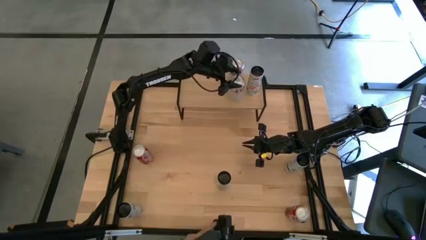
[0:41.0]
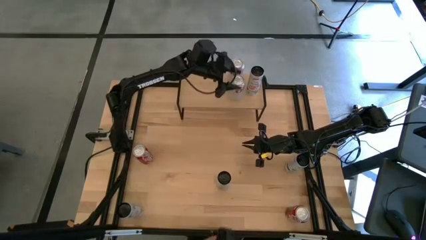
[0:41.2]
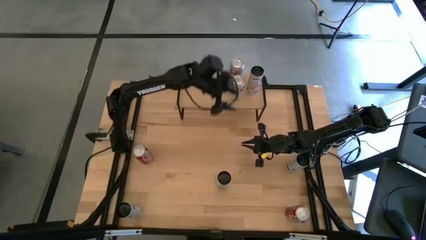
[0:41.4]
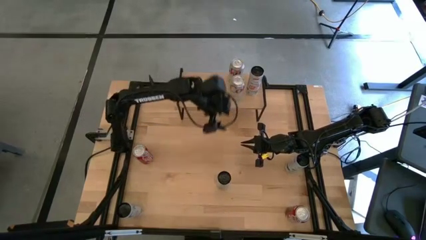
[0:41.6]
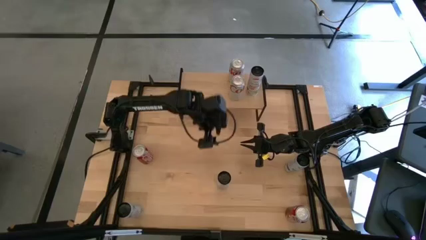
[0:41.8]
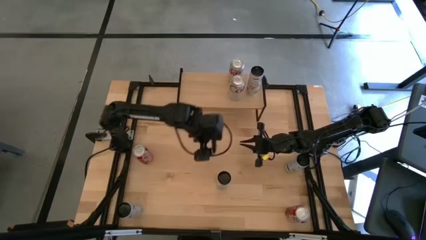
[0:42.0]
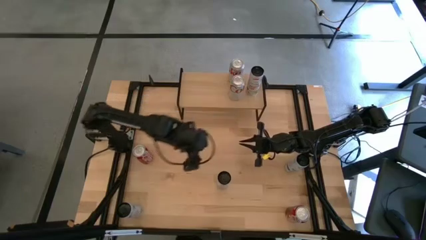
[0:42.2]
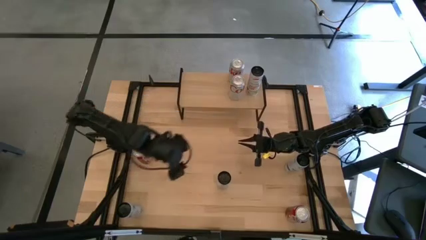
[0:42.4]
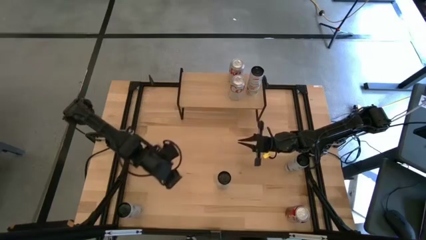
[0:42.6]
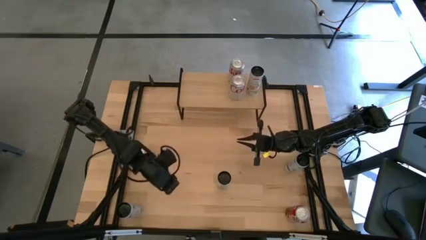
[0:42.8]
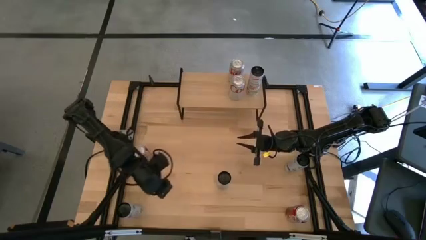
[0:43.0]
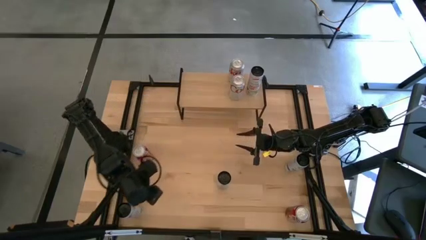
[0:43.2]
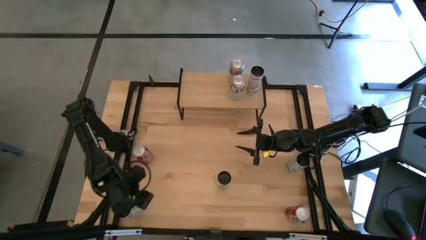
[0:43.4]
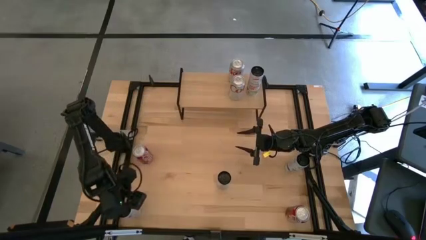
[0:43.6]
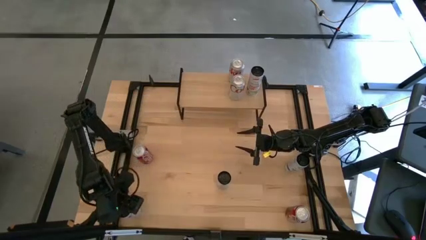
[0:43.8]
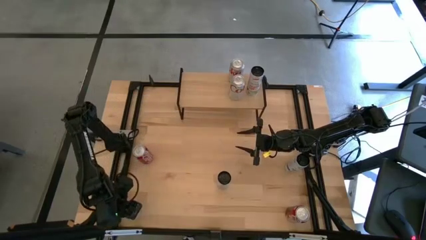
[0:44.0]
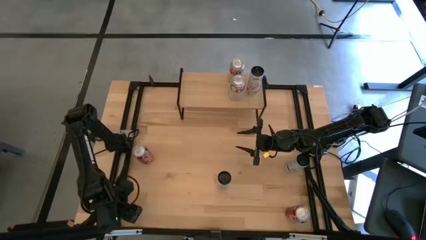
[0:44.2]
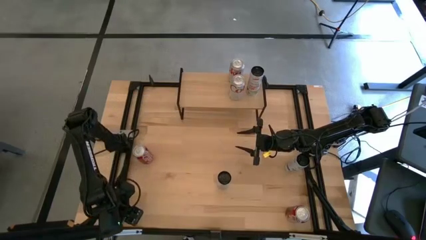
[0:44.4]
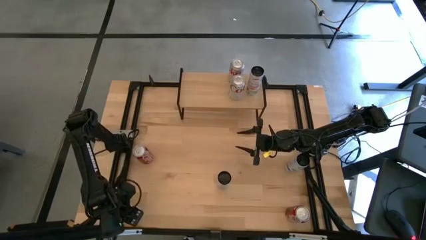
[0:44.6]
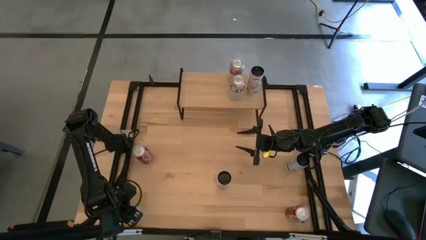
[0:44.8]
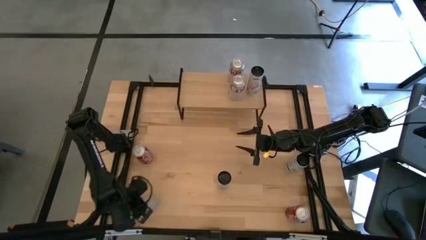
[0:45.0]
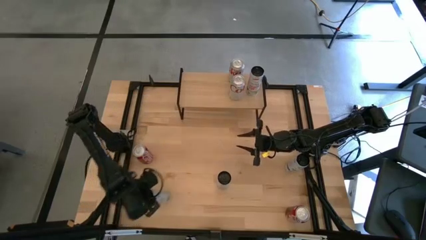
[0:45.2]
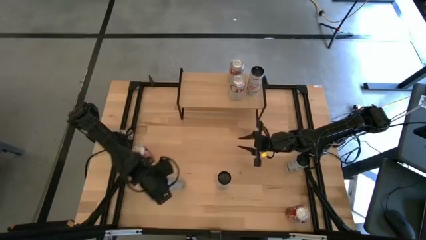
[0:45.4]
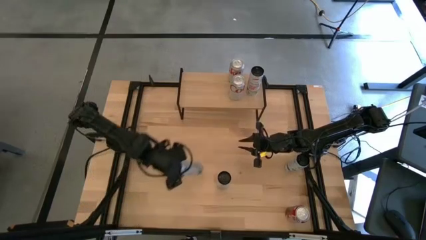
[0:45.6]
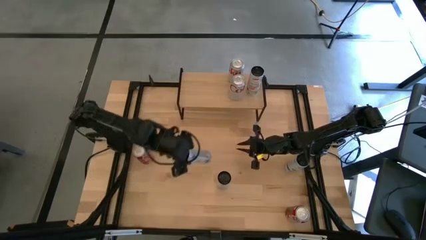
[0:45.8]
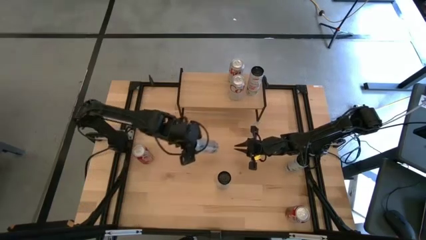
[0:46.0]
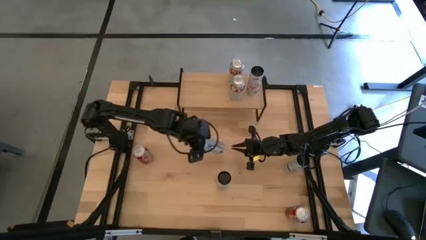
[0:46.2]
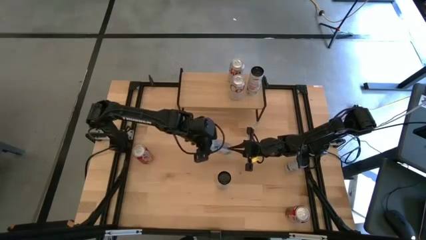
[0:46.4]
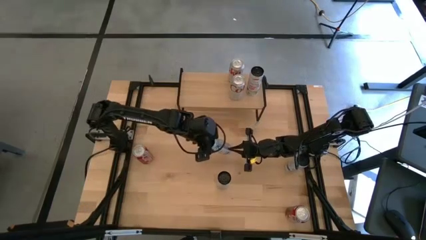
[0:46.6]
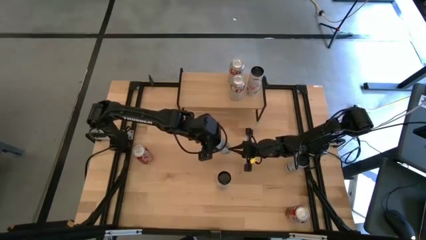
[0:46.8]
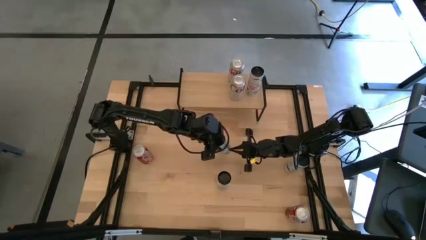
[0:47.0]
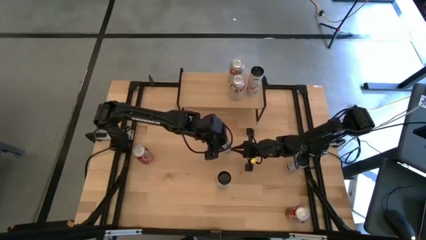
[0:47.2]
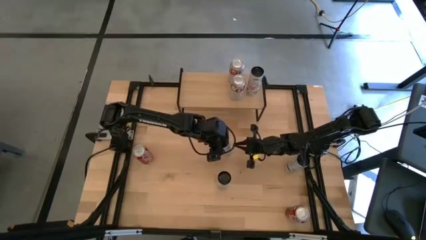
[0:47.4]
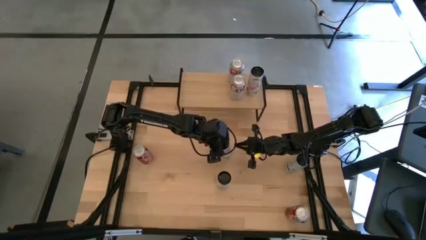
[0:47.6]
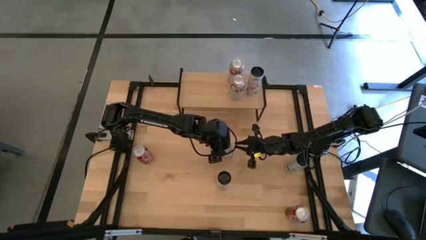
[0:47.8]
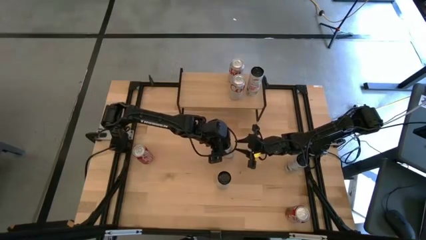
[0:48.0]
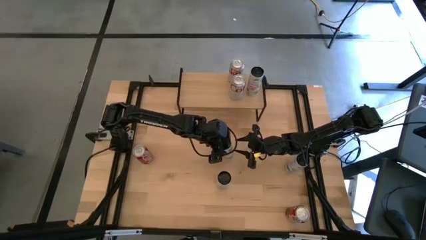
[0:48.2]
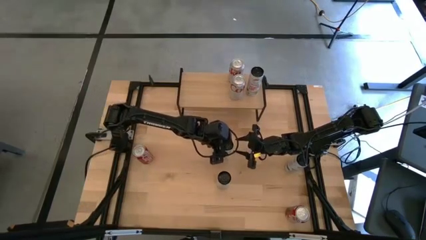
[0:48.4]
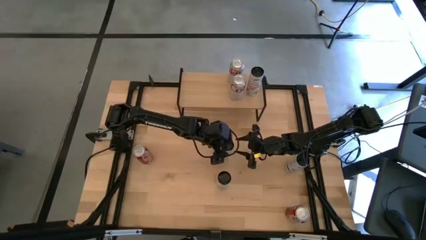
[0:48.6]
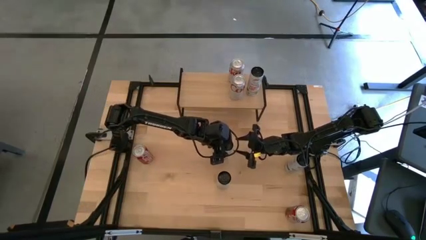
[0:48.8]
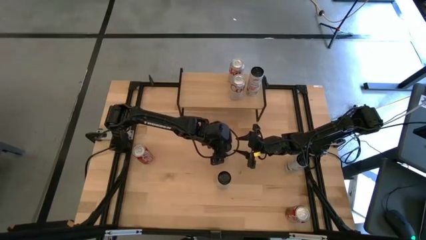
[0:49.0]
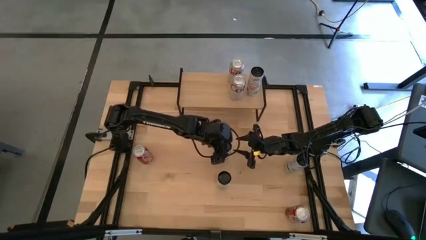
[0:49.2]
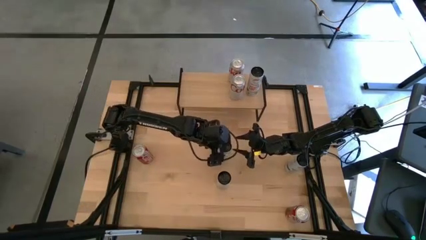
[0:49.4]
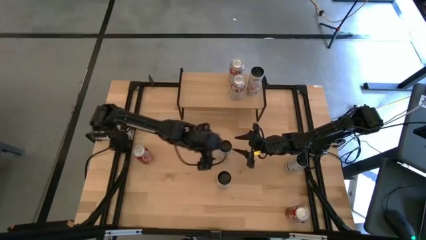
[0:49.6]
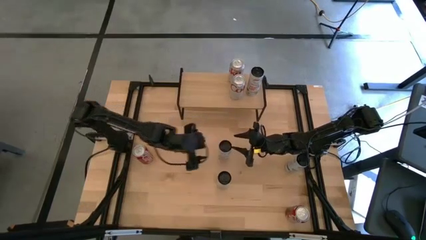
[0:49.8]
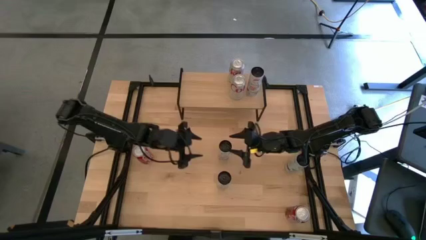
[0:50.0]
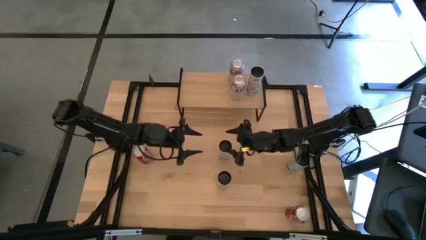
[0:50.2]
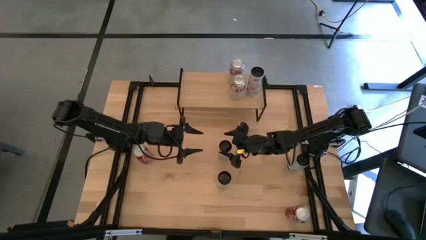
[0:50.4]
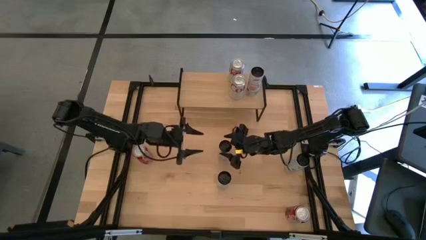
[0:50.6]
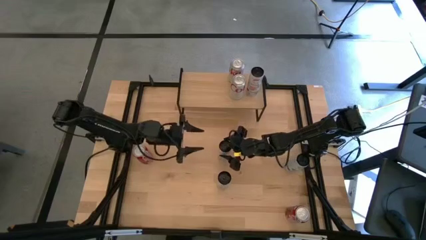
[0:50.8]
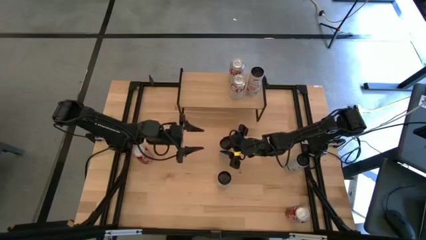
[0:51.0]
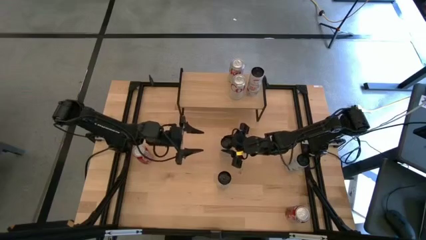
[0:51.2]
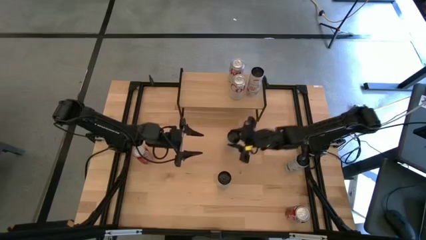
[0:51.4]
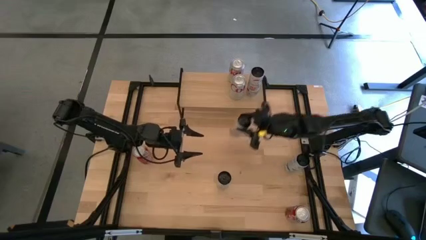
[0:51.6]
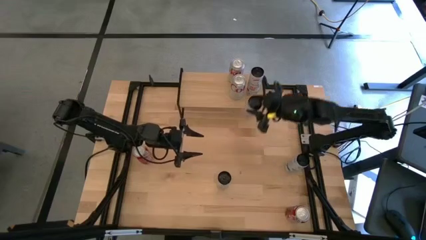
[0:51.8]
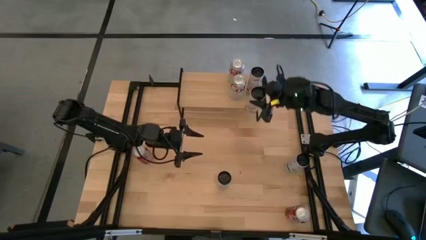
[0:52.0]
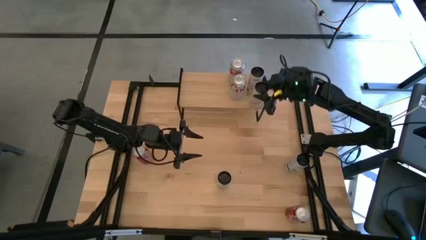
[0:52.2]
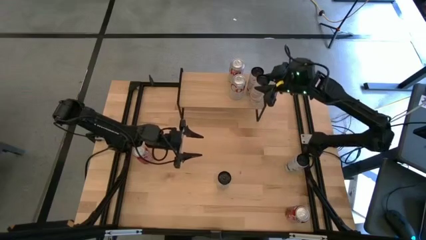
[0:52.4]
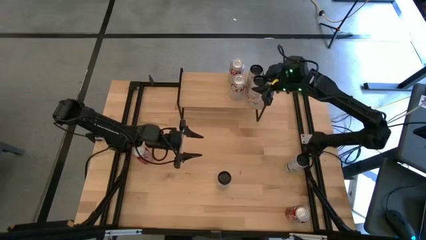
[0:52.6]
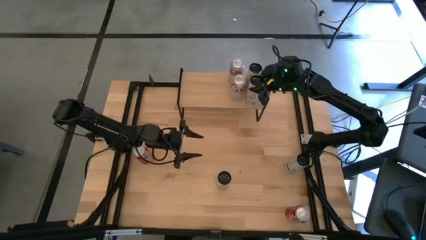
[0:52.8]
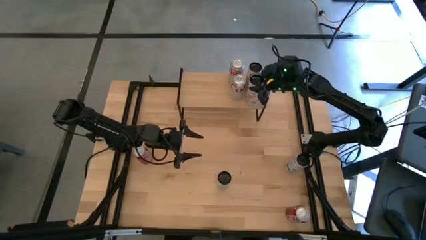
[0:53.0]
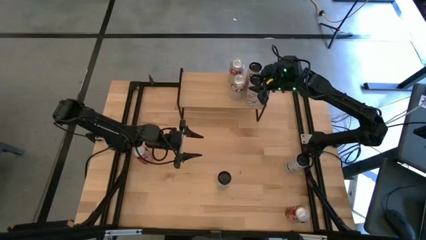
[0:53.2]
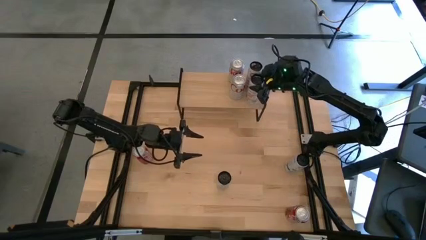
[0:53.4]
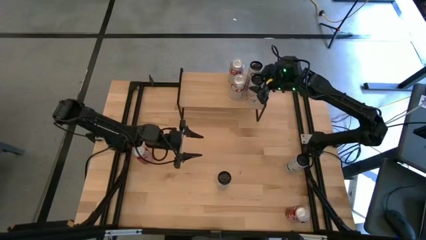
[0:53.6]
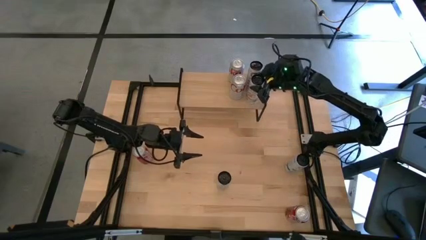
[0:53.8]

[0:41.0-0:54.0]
Task: Place canned beverage on shelf
Put the white-pink soda can on the shelf aligned with the other white-pink soda can

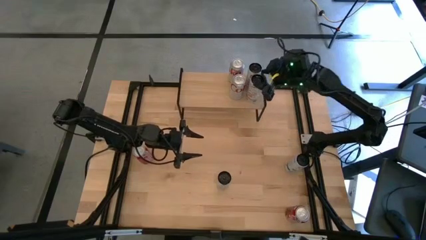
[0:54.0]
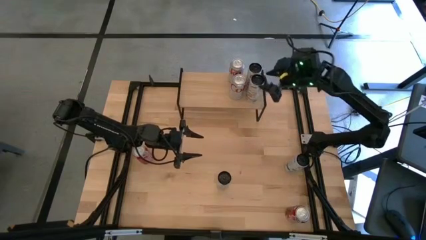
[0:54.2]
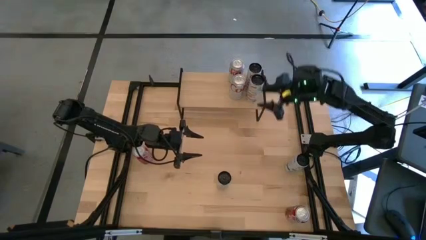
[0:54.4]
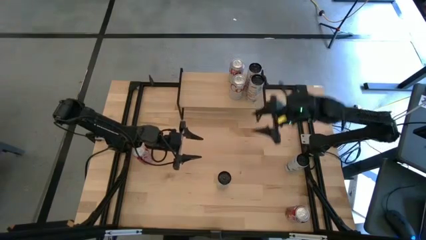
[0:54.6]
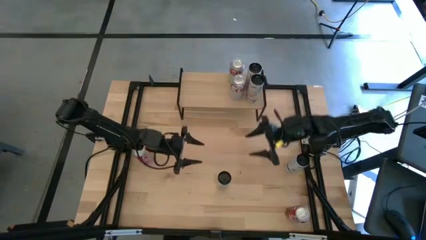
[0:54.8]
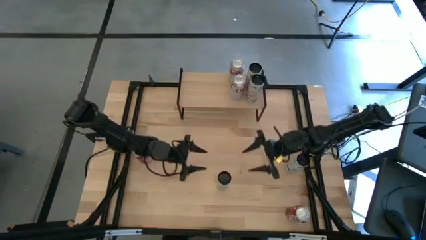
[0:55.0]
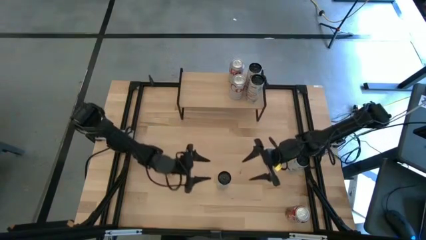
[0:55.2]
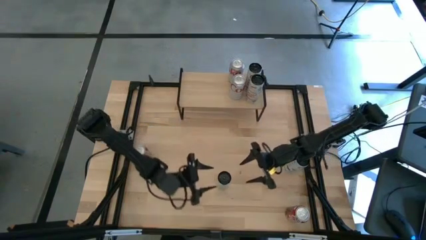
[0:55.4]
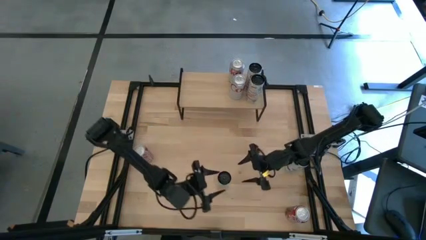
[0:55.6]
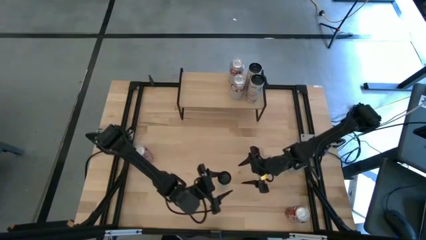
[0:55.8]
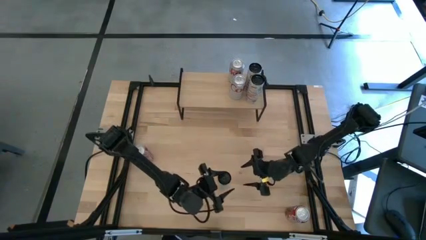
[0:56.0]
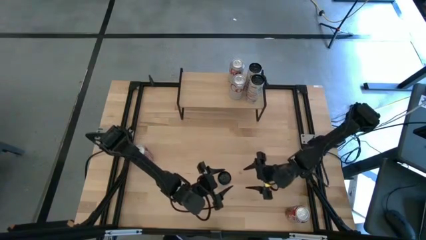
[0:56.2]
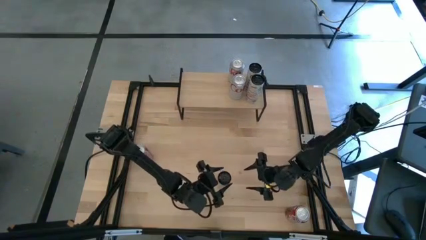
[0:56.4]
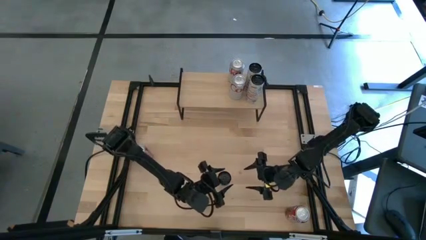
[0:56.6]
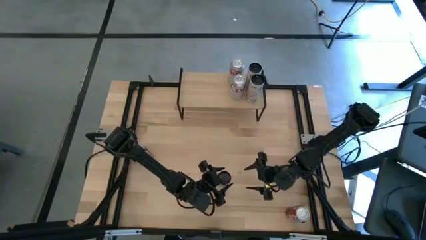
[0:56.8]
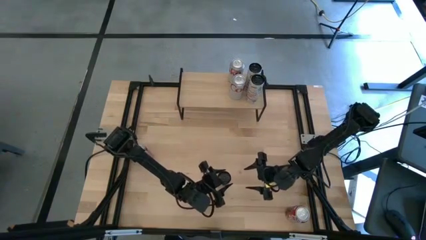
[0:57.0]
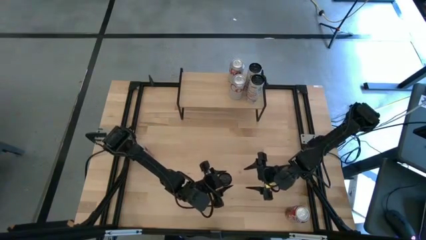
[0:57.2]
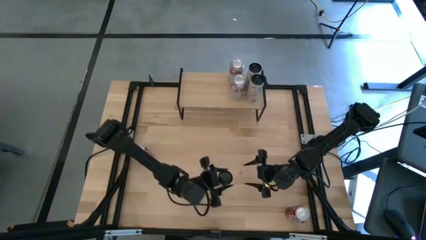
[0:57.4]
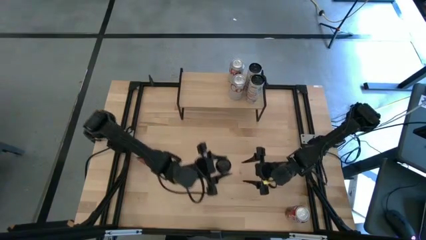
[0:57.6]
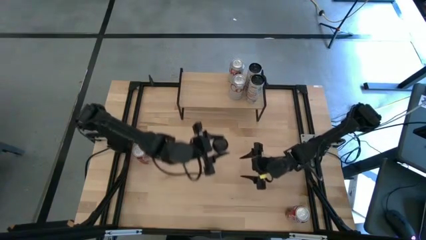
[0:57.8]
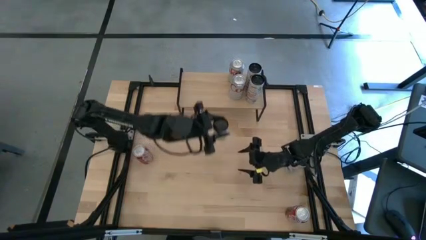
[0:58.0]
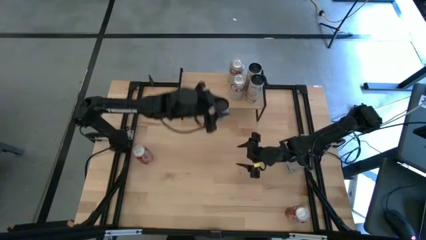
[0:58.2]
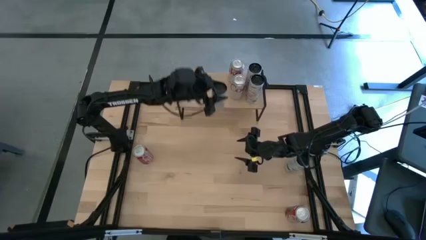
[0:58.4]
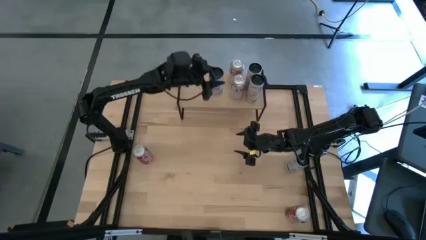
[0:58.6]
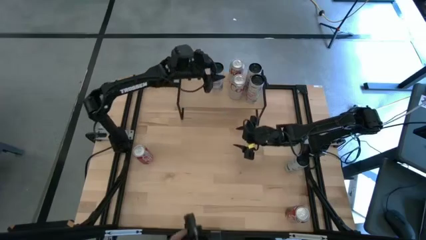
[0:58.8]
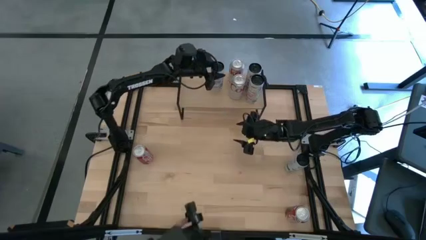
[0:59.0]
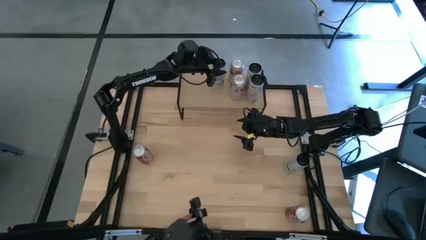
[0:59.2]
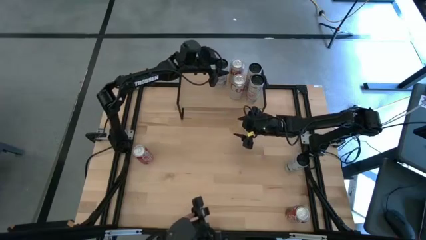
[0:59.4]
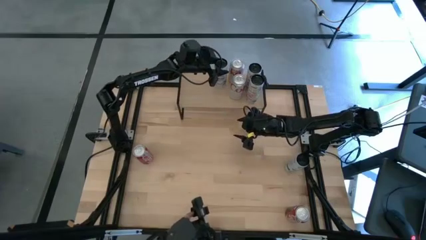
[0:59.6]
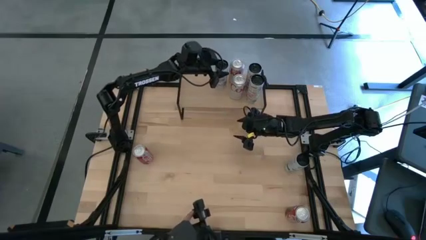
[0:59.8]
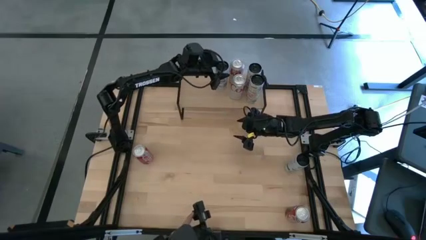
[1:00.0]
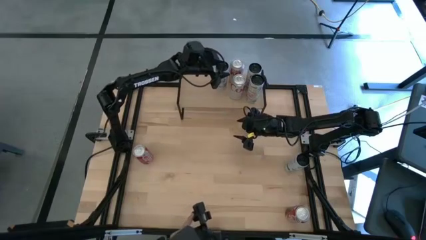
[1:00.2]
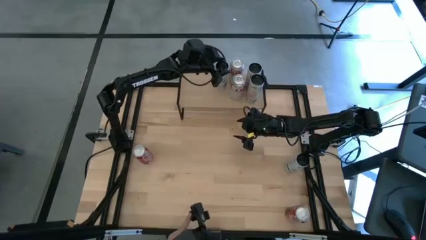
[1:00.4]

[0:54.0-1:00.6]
Put the left white-blue soda can on the shelf
